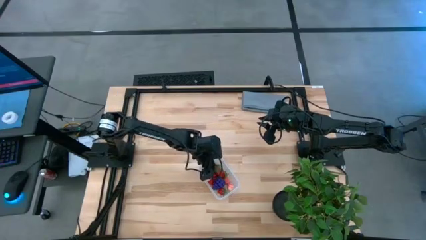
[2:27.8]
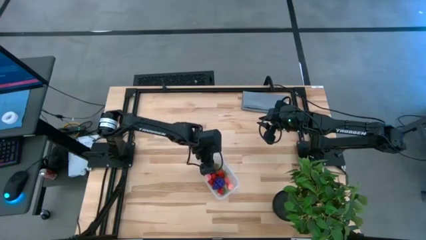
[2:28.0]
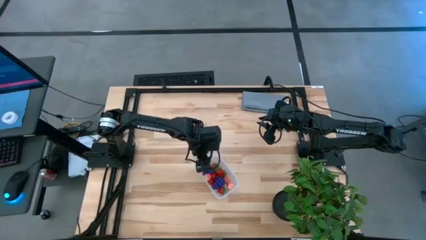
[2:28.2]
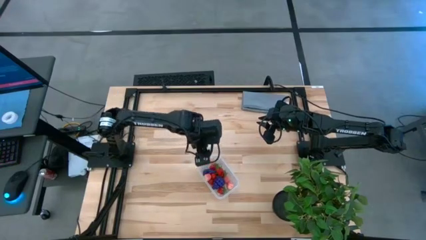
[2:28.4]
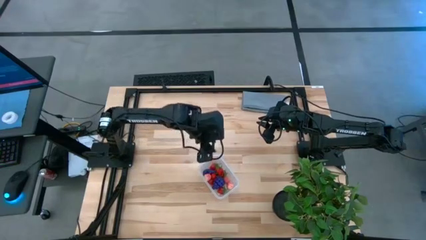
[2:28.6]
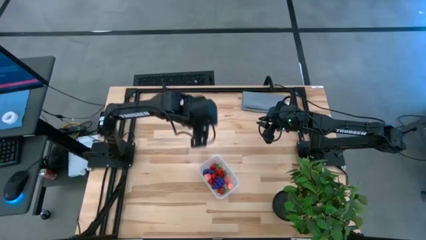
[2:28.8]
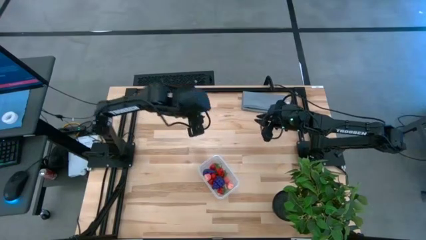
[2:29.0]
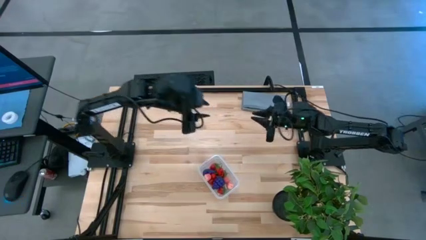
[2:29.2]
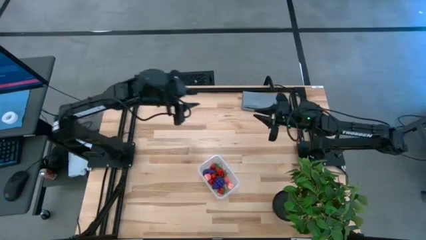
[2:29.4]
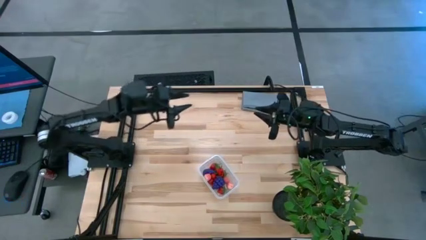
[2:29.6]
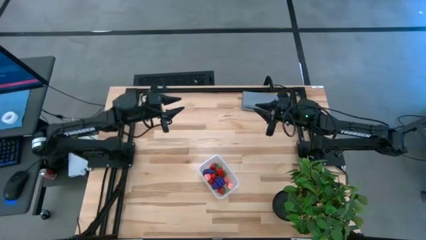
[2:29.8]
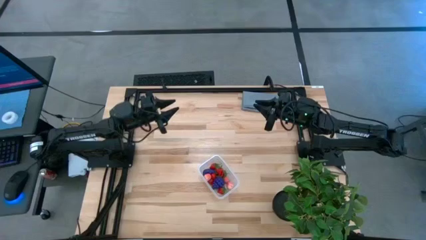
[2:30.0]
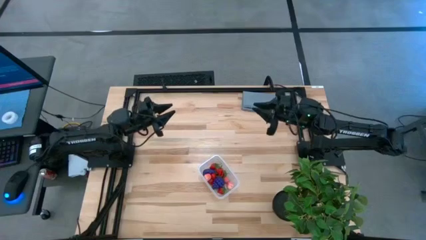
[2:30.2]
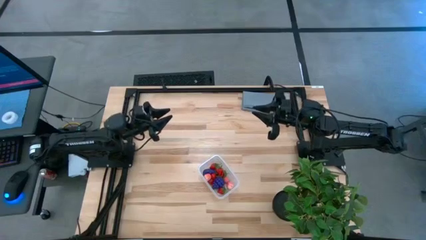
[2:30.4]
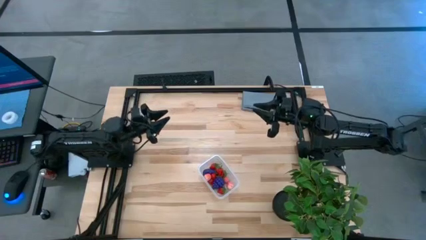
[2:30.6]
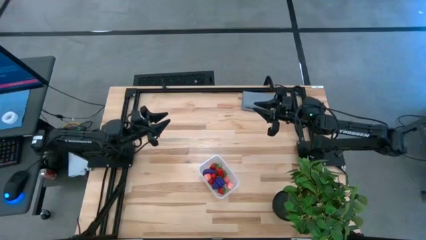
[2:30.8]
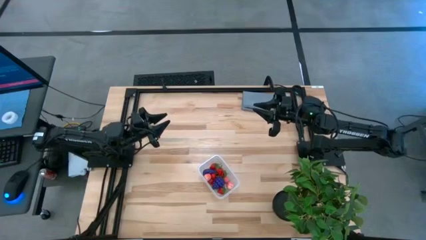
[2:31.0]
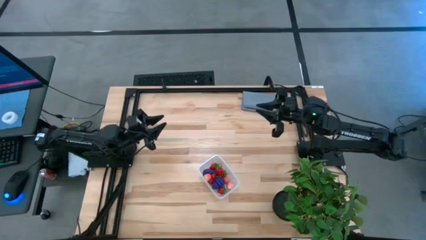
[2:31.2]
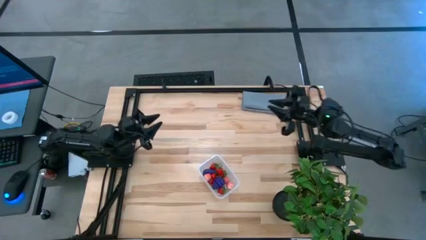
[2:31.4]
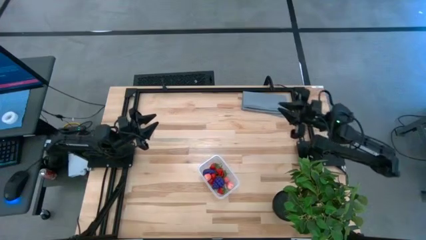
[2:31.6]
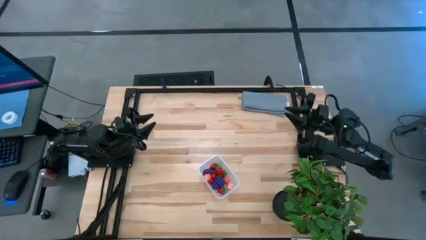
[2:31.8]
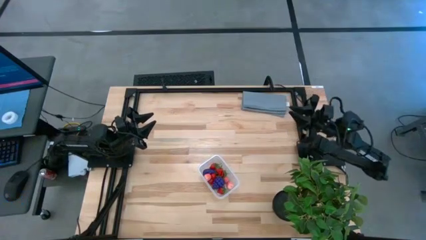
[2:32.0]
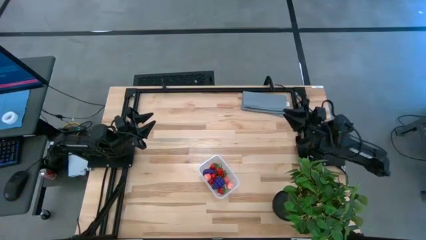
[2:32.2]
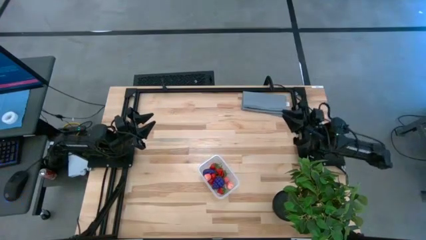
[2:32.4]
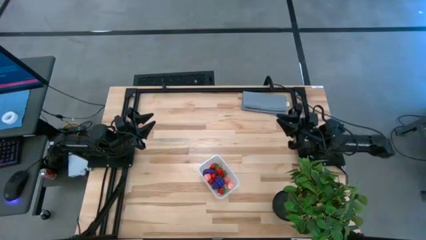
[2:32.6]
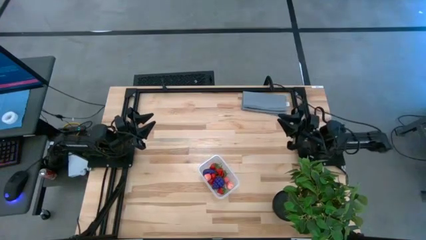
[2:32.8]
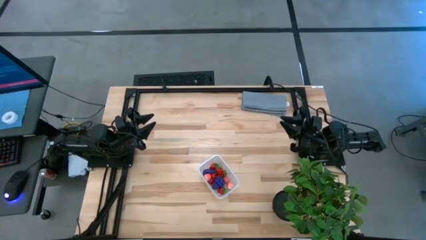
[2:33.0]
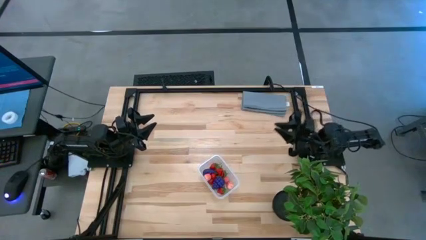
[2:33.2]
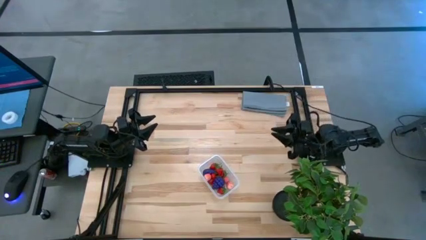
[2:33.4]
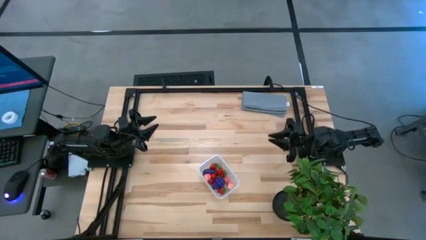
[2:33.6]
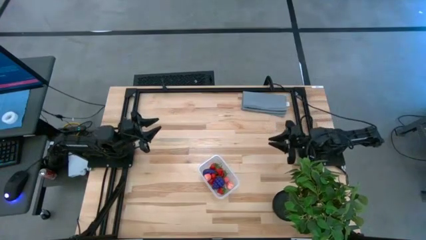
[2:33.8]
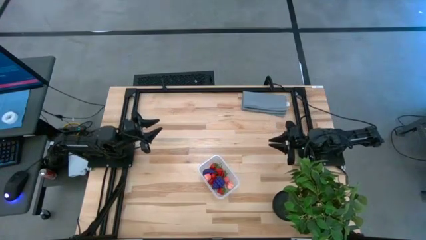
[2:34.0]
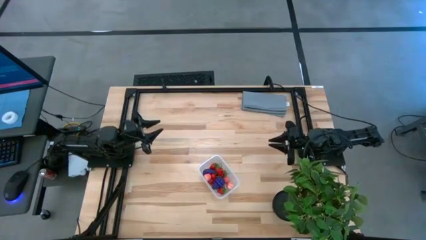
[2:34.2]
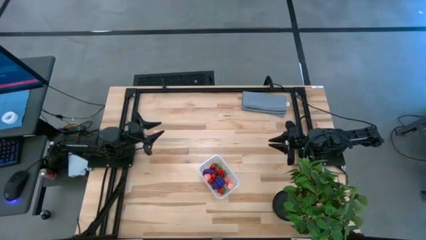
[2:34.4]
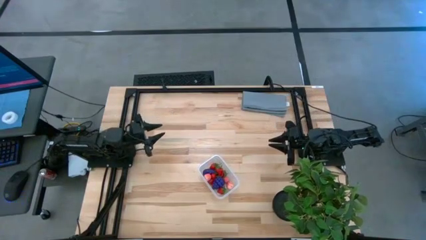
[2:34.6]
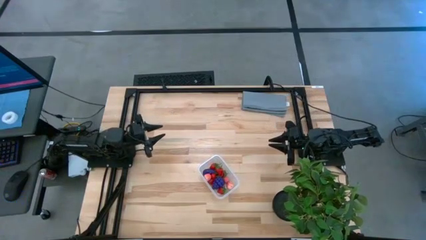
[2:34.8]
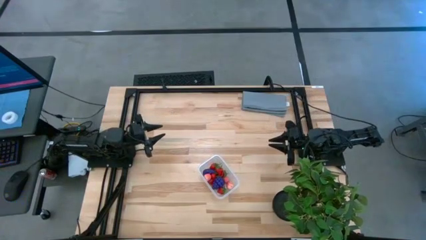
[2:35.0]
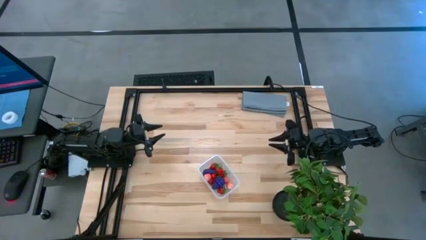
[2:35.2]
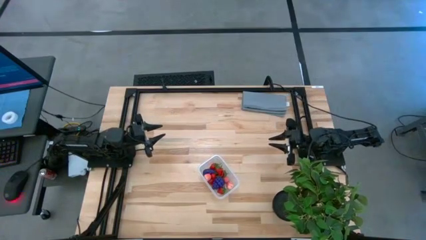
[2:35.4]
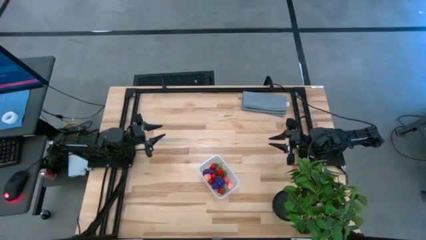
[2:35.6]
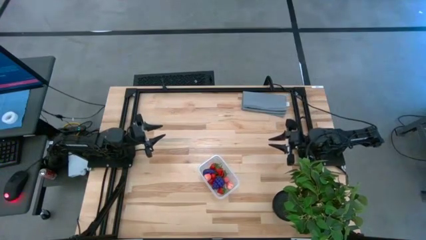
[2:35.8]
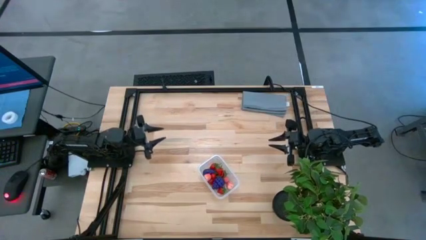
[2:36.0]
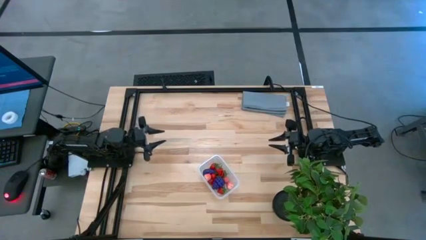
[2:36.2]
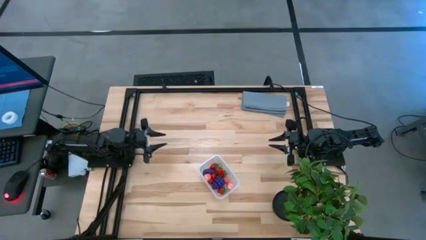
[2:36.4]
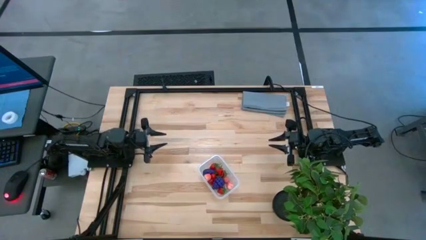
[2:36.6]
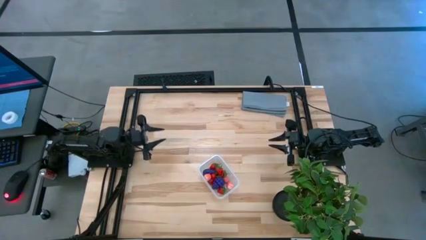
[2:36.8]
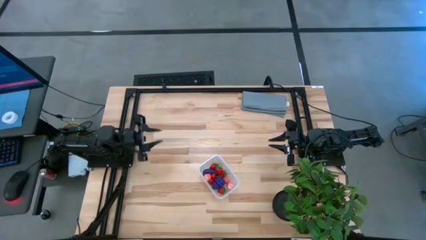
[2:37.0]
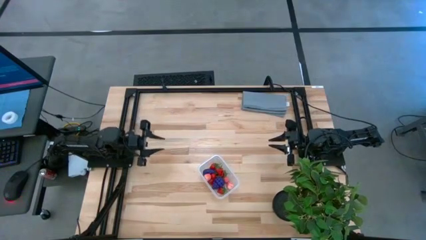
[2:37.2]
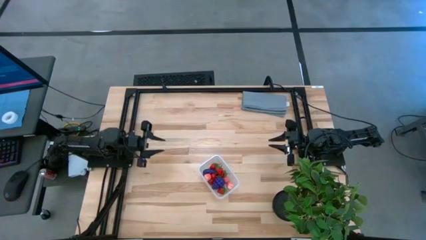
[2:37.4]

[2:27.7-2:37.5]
Task: Pick and placing Produce into tupperware
Return to Home Position

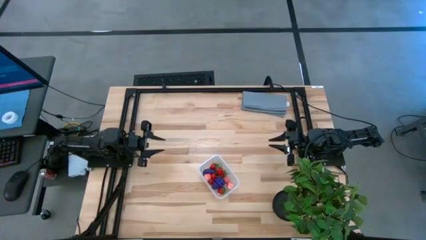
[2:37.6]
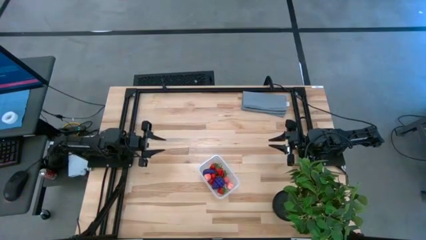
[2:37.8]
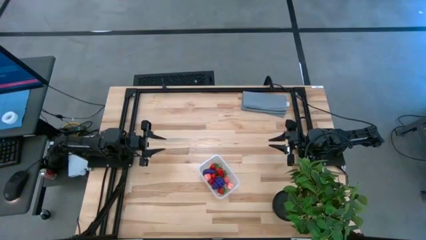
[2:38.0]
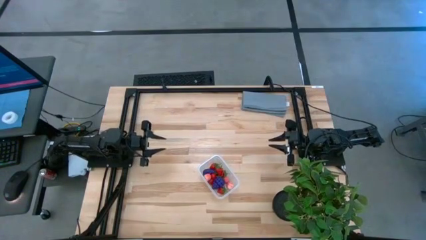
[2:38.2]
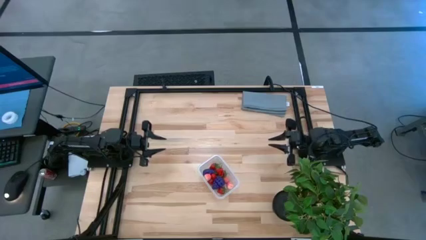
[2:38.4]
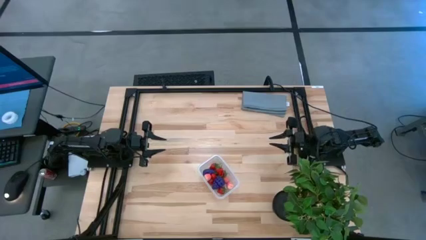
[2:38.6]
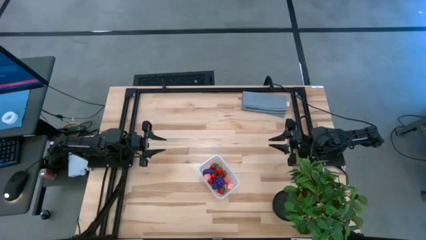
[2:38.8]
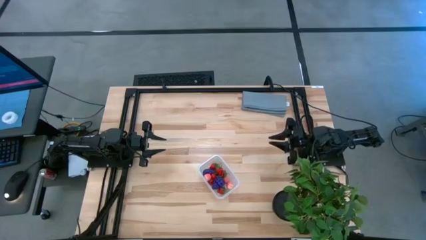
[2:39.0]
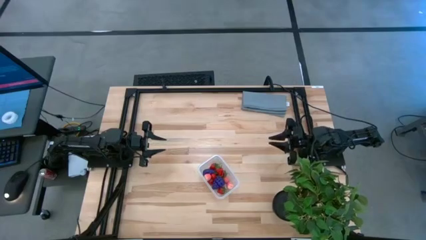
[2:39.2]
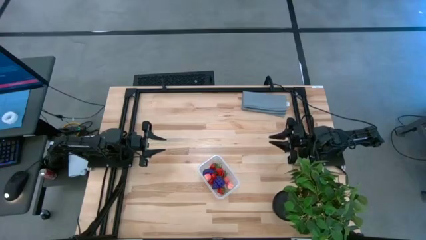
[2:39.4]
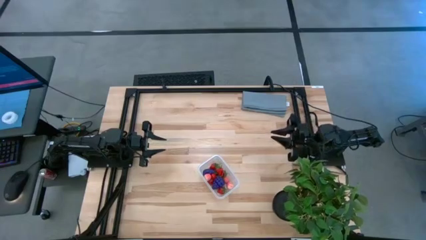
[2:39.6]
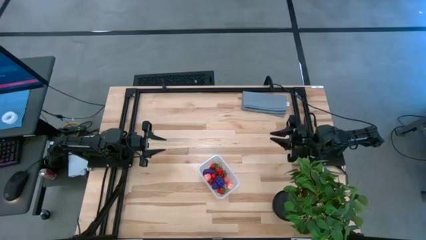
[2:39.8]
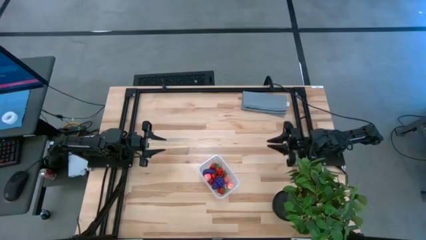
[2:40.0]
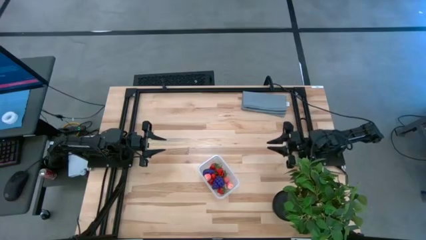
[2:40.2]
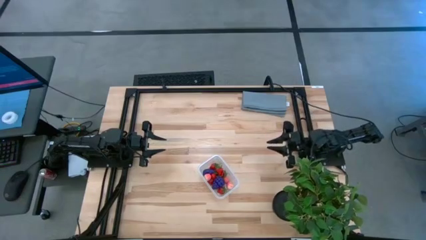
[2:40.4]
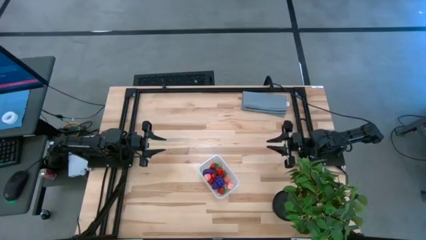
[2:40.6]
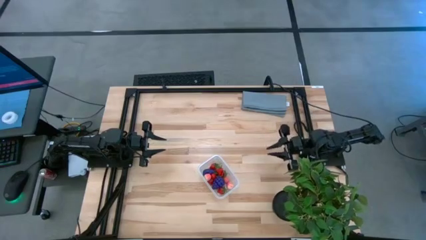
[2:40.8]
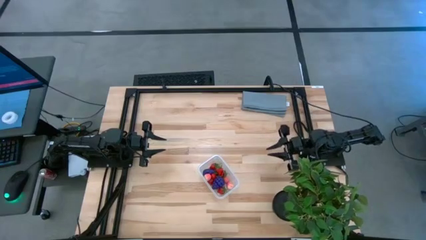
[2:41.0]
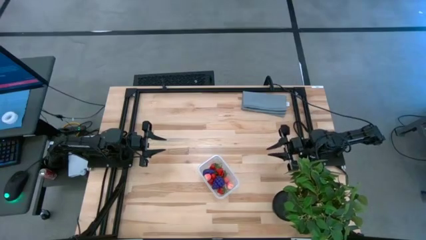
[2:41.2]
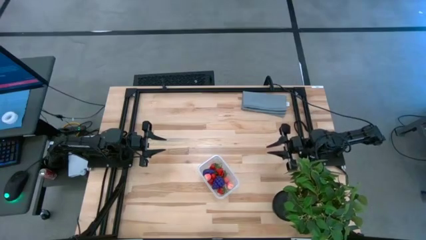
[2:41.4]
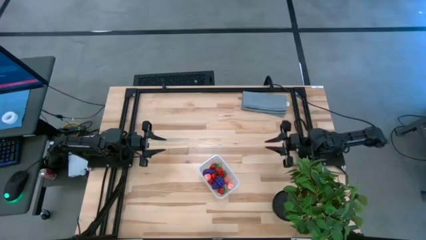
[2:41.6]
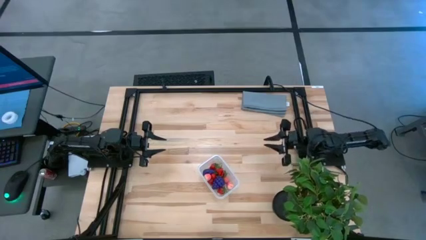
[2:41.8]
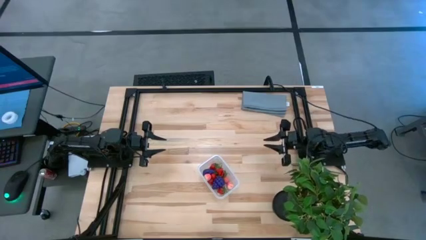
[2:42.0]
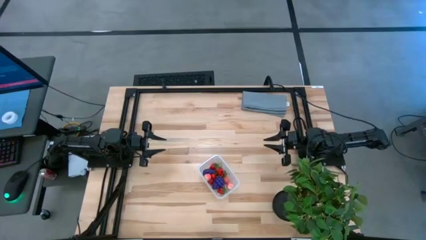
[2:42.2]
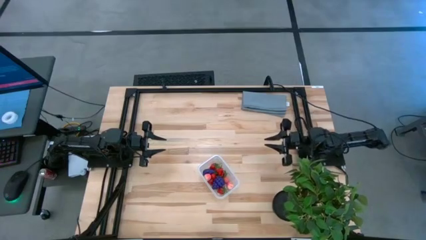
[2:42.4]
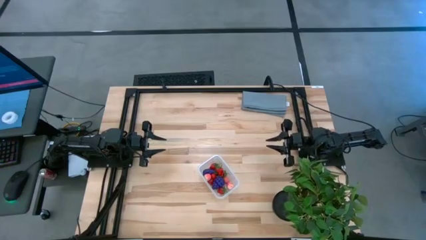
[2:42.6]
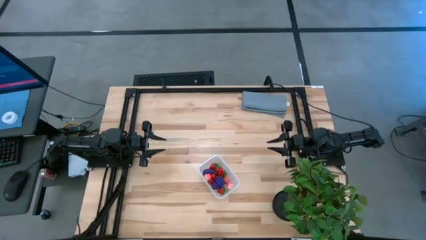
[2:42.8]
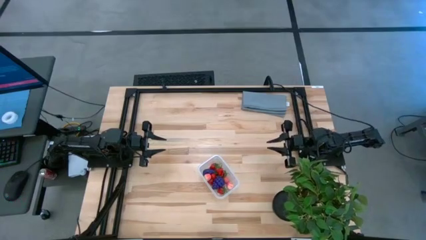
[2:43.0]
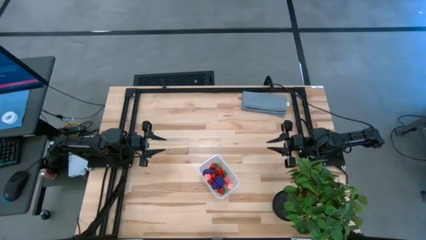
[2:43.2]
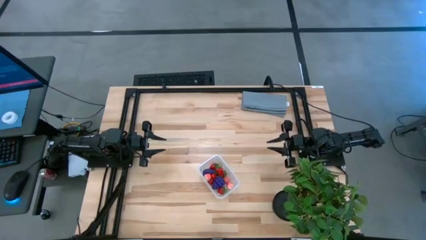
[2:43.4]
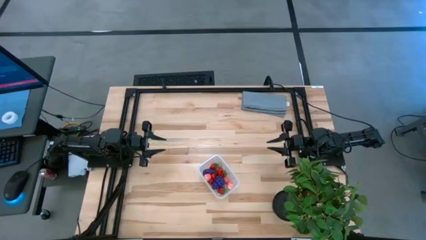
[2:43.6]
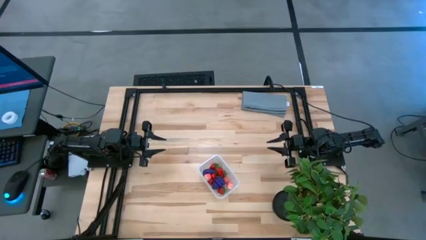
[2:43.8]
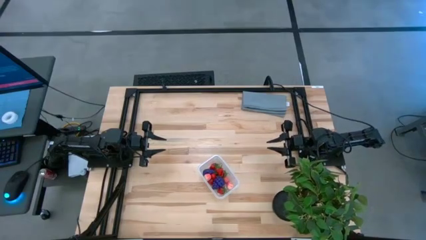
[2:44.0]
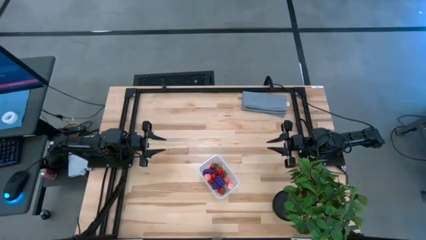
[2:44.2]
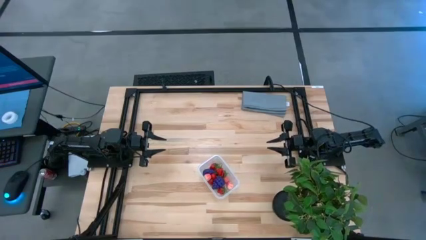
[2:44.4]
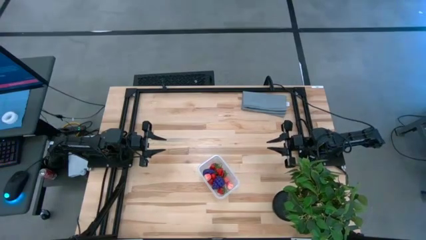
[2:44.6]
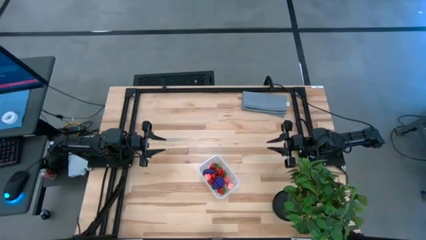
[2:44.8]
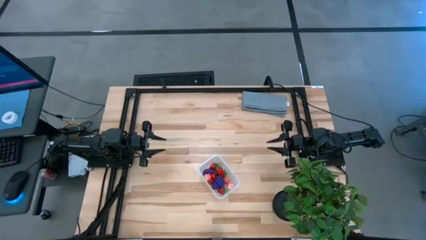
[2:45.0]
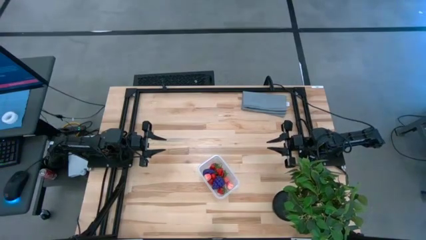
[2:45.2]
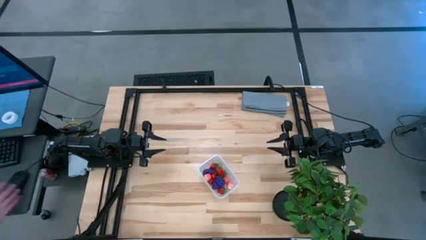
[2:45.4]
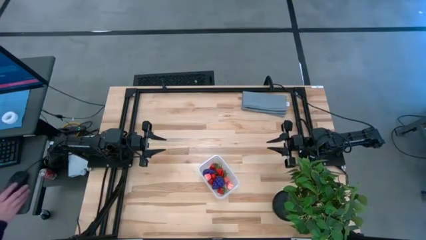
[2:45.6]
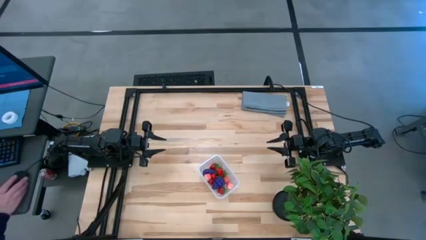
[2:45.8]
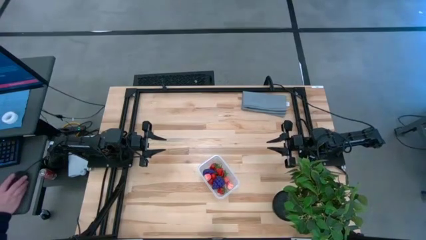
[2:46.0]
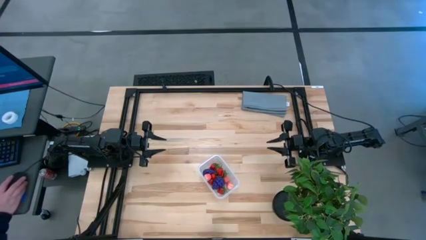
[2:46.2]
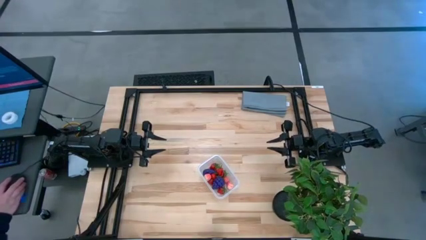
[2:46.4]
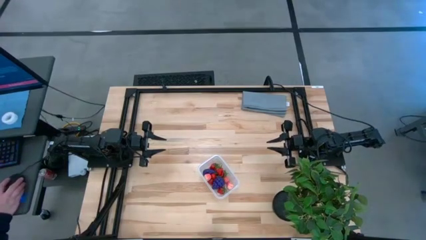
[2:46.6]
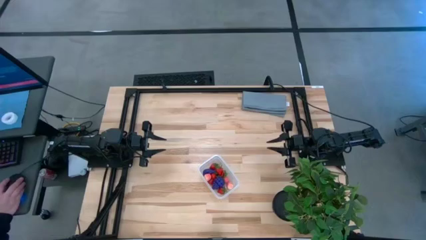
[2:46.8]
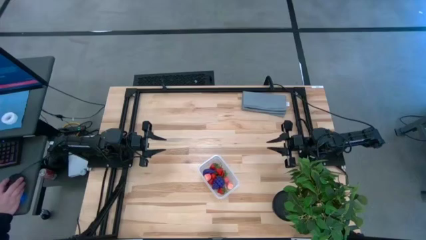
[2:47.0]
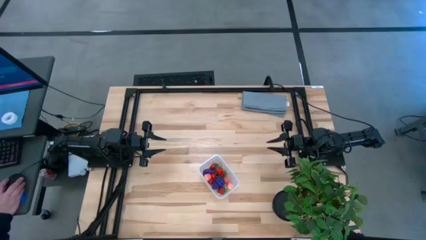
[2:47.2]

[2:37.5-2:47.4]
Return to Home Position
